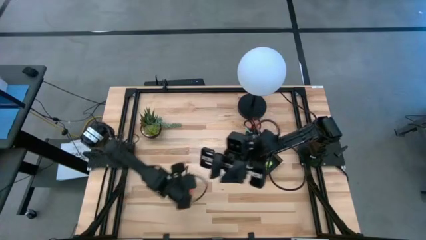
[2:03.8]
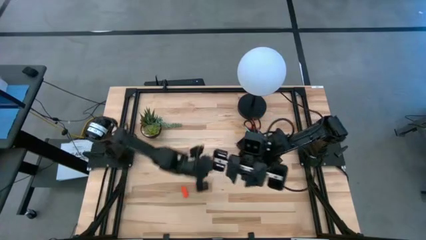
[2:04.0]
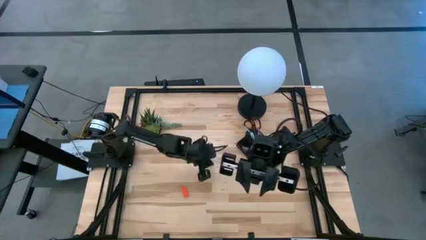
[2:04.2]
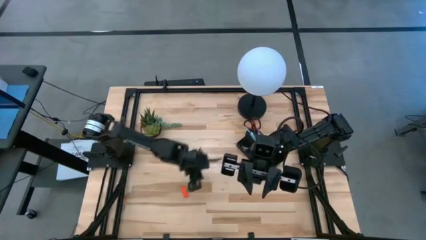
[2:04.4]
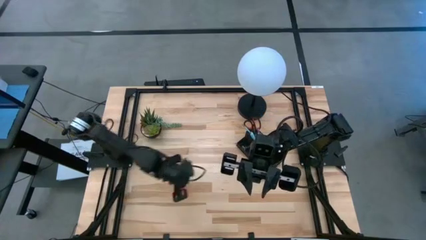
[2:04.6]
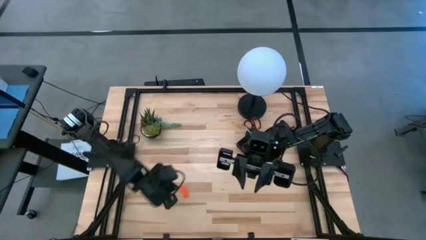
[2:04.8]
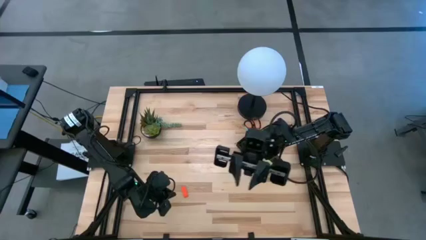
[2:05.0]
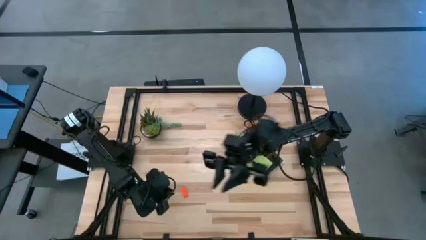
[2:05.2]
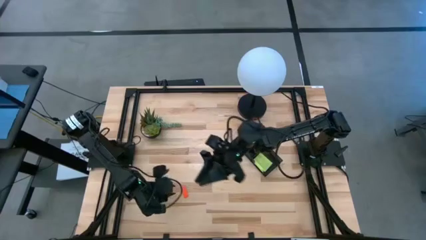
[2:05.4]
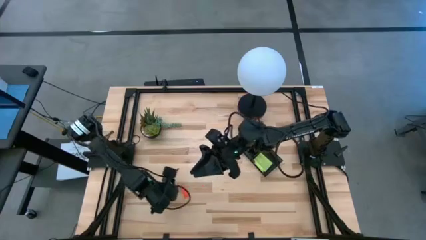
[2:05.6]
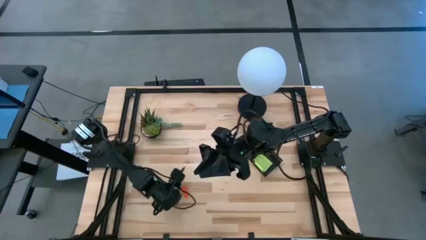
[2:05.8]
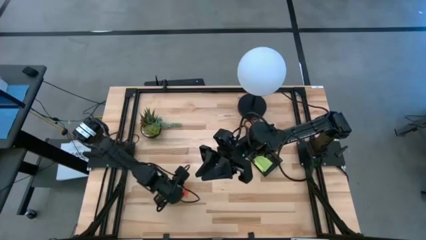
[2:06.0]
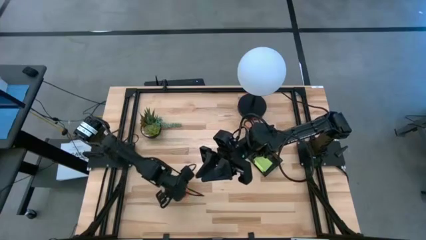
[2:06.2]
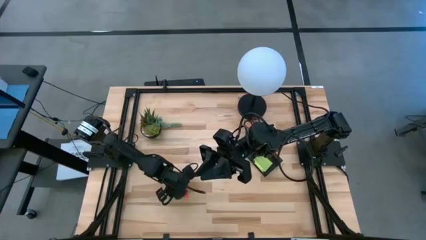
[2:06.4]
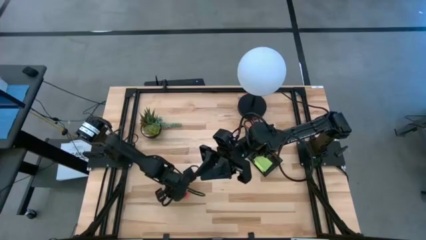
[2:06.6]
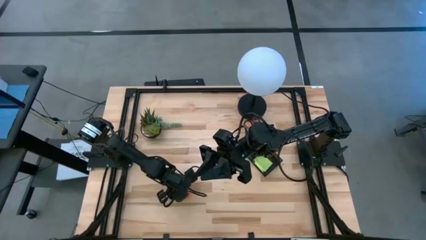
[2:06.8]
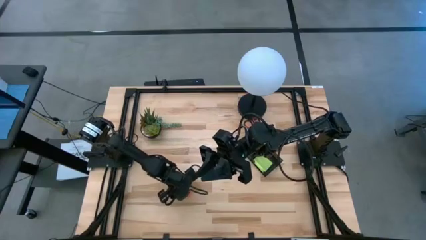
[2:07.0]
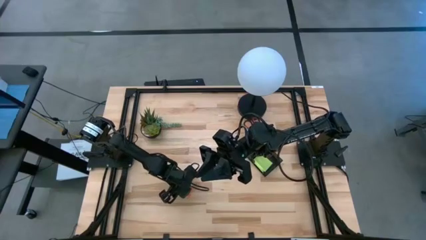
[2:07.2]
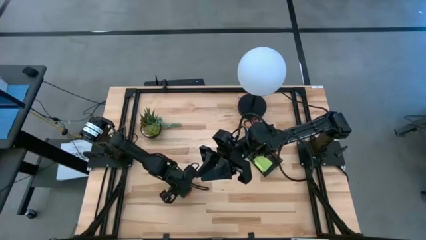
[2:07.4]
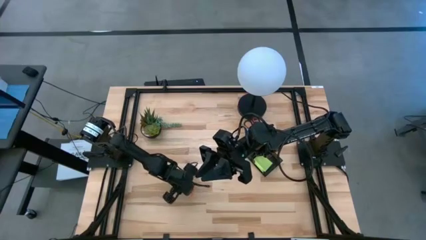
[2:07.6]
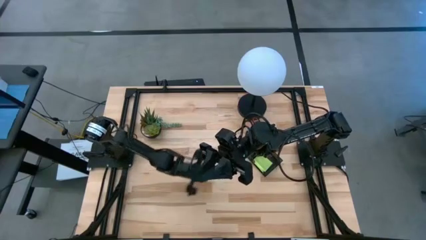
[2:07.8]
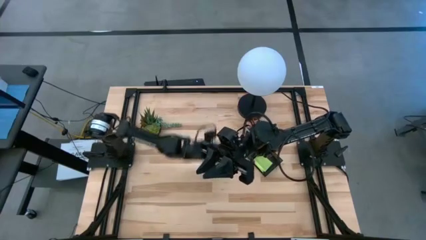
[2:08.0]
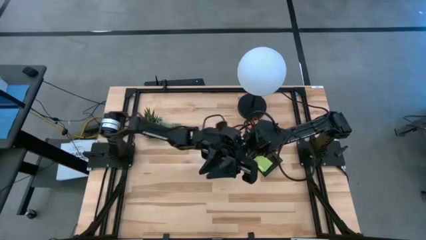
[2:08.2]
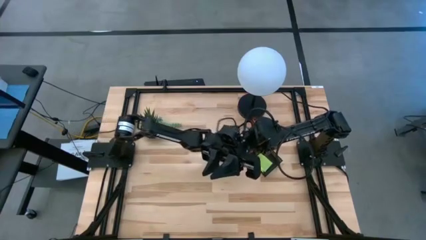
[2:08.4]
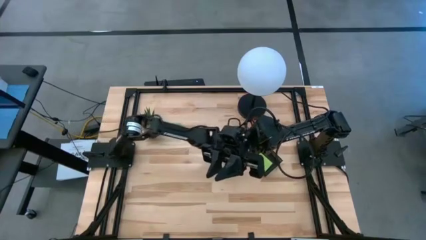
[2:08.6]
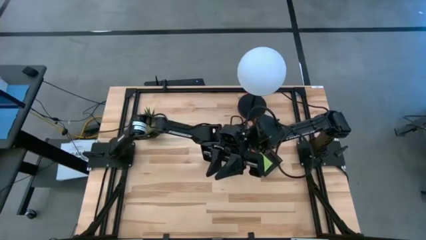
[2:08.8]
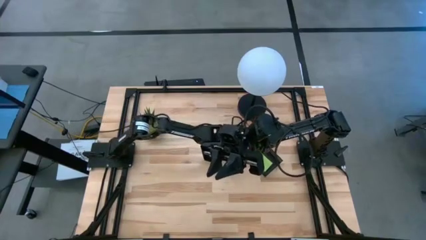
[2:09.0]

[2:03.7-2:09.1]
Task: Pick and place office supplies into organizer
Put the orange eraser into the black desk organizer

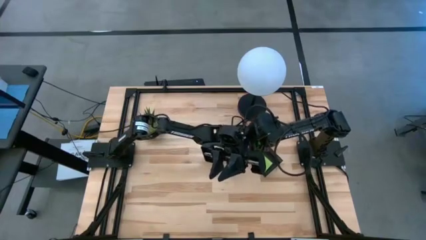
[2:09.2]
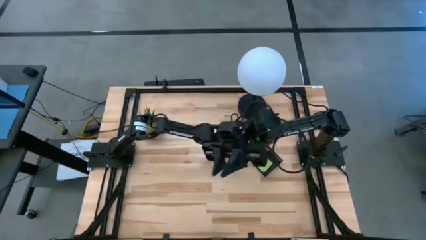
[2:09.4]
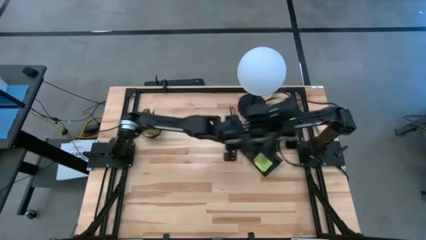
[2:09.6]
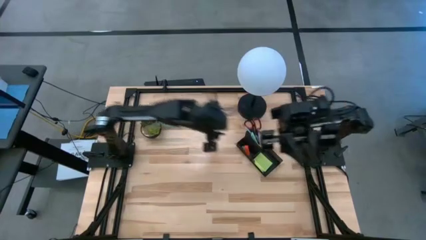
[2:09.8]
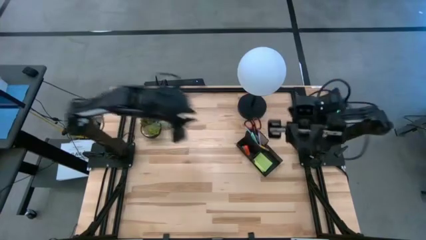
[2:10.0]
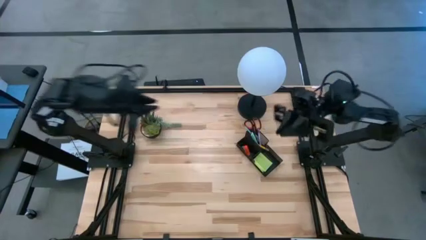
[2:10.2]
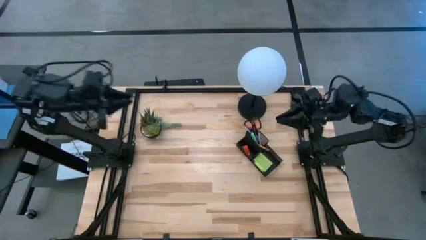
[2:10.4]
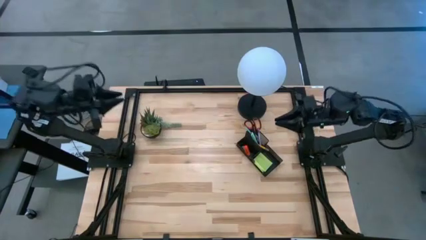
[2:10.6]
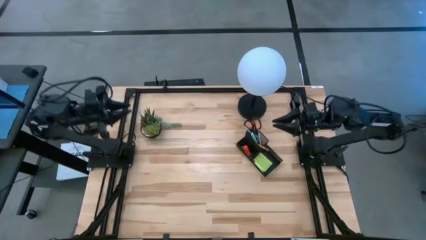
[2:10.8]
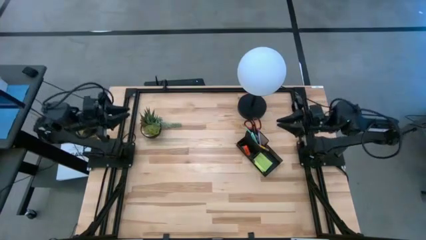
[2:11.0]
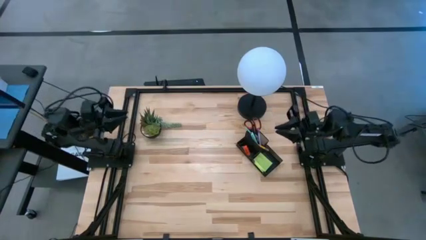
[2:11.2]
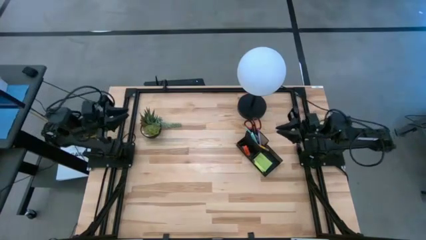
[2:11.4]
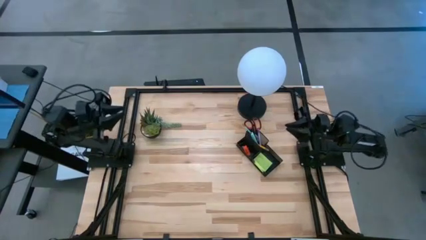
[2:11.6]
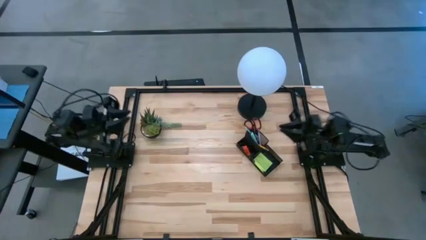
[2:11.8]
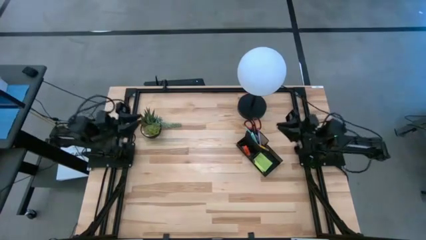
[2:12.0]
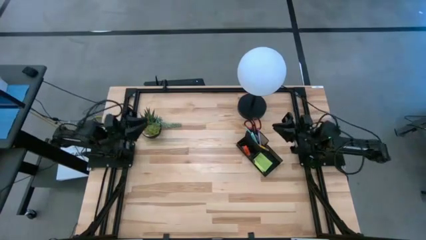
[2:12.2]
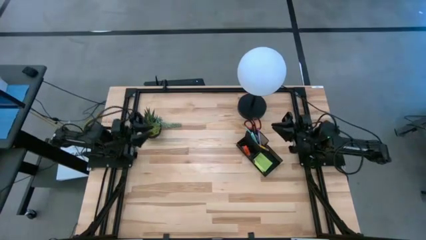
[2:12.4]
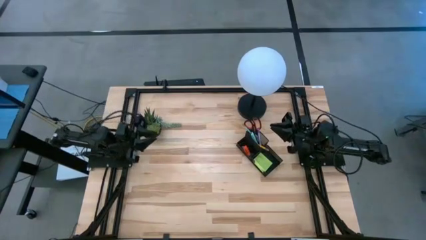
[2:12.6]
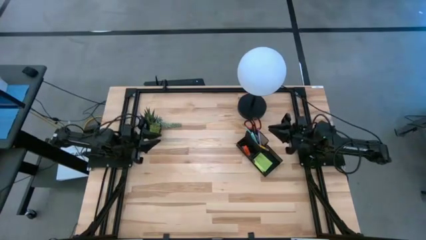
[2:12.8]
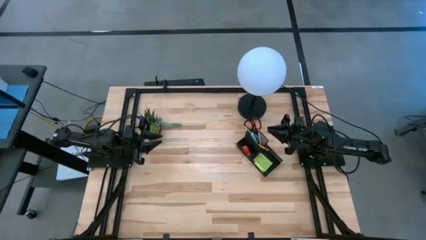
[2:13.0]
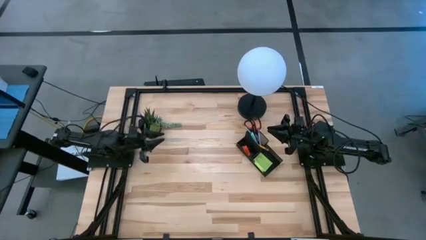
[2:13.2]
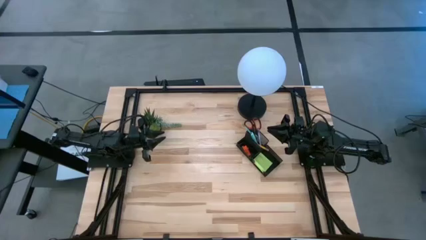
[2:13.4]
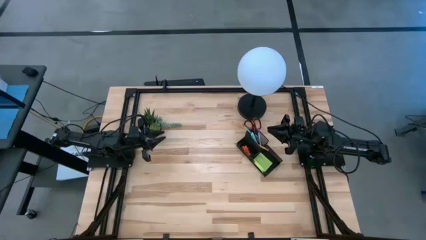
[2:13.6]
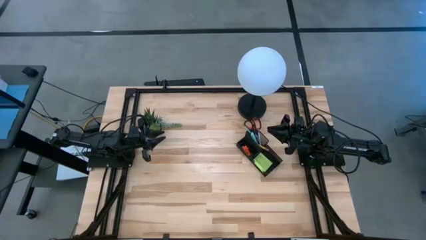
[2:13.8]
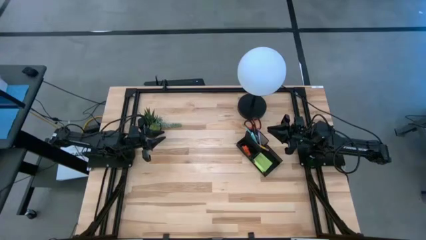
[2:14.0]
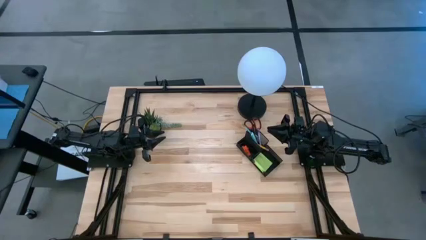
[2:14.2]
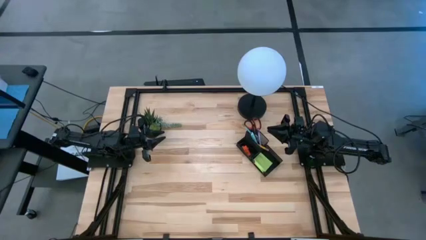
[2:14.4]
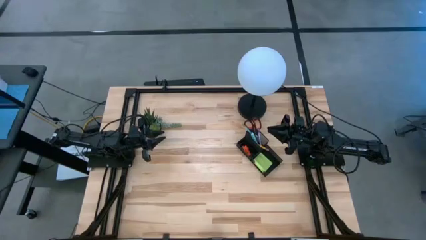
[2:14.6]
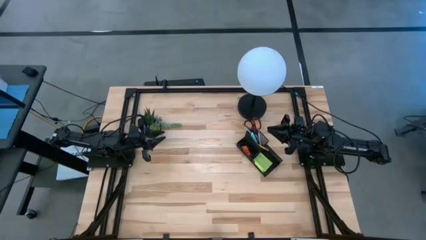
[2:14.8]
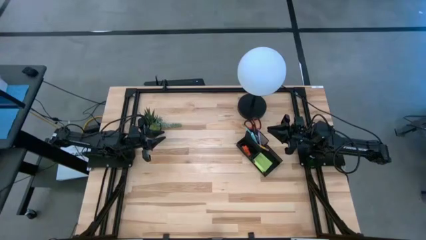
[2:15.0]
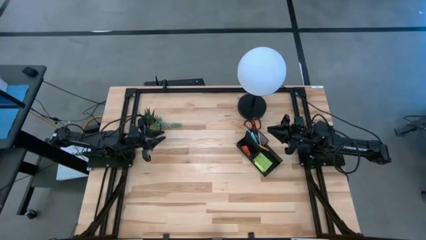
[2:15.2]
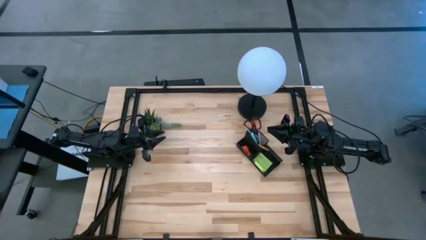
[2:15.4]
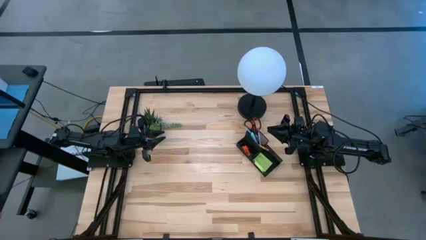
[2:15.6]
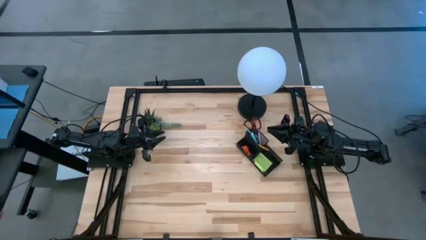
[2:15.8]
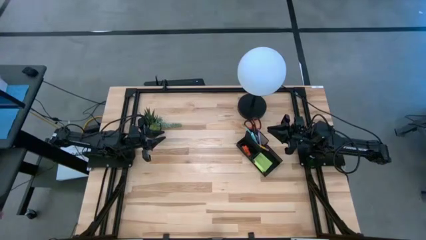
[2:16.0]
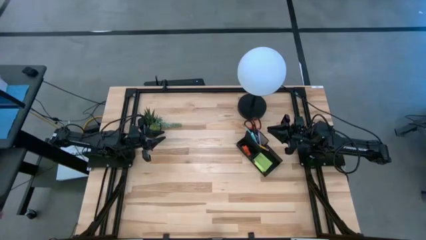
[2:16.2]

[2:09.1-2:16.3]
Return to Home Position

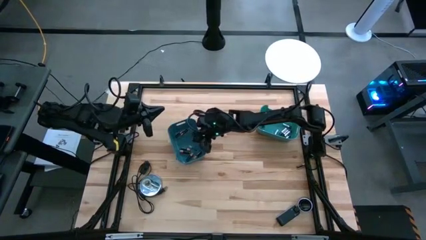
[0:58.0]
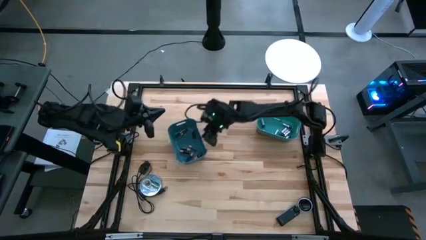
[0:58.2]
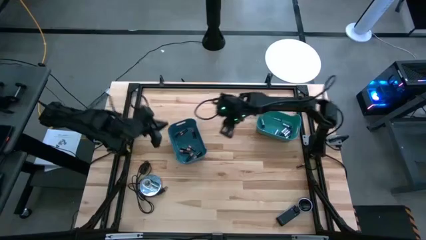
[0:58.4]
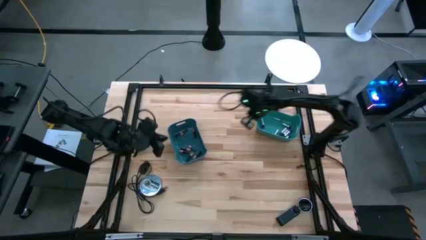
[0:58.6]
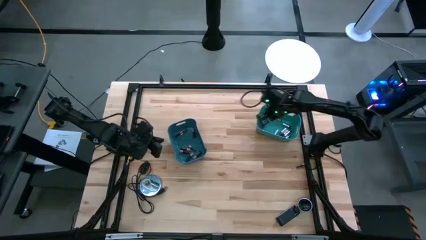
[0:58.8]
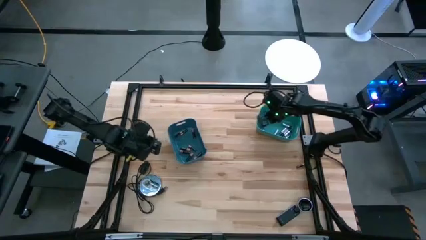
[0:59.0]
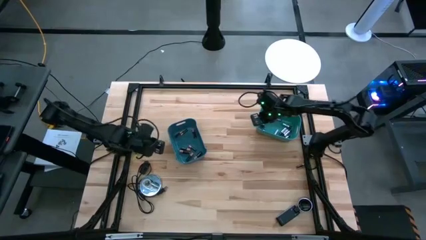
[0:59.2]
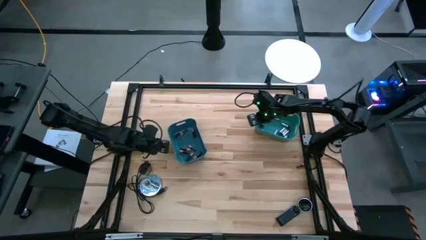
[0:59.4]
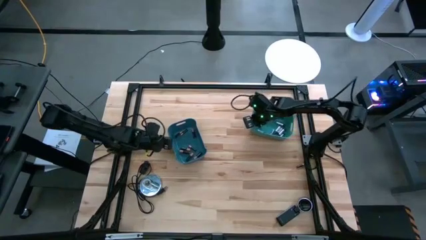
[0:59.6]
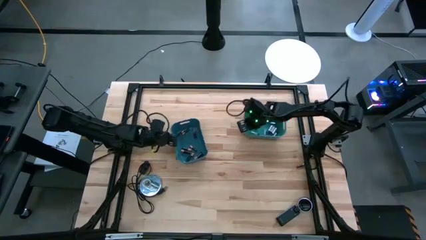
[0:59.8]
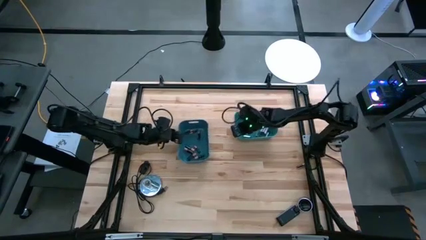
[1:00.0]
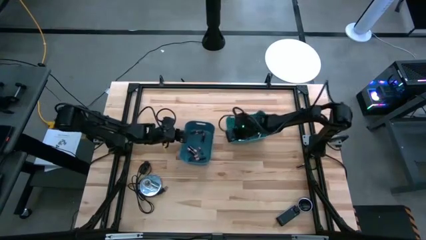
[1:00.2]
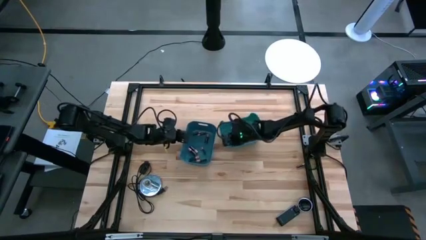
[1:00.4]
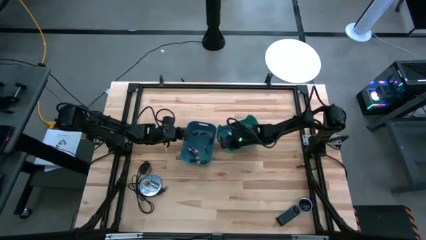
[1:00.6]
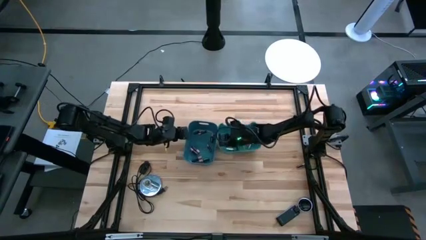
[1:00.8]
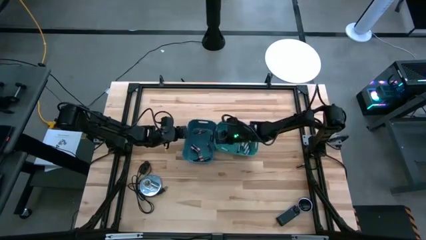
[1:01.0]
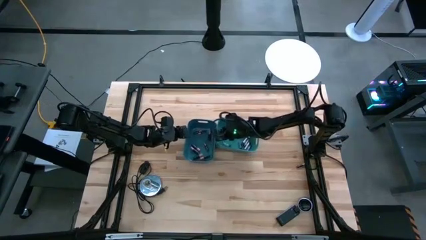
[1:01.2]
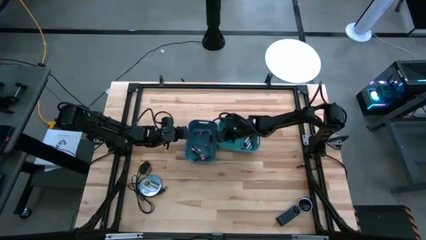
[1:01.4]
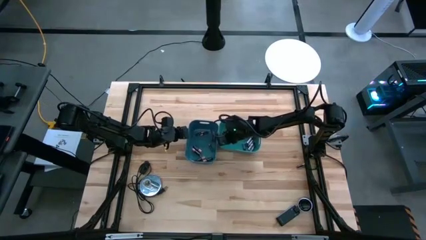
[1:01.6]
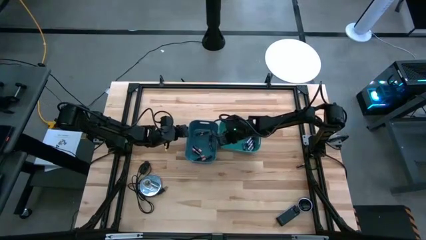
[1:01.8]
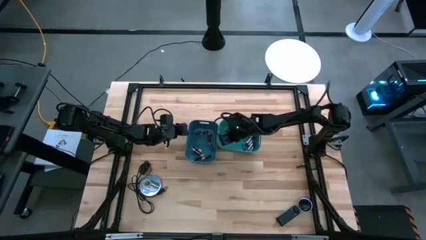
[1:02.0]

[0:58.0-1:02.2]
Task: Sort batteries
Move the bins to the center of the table
